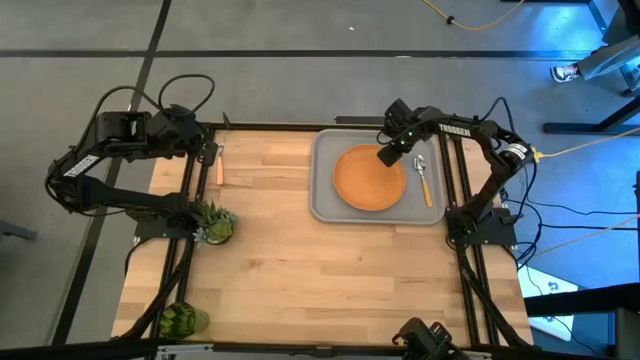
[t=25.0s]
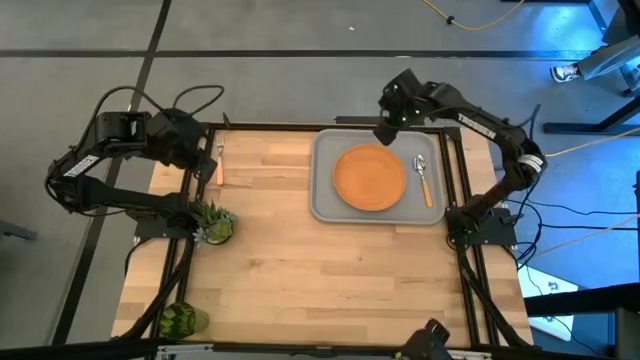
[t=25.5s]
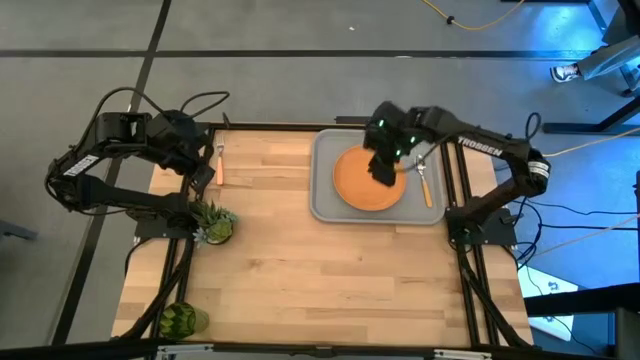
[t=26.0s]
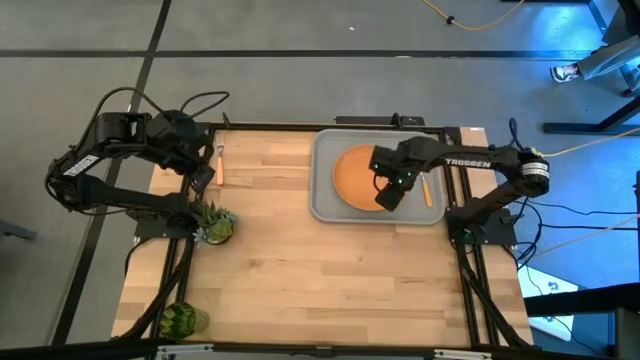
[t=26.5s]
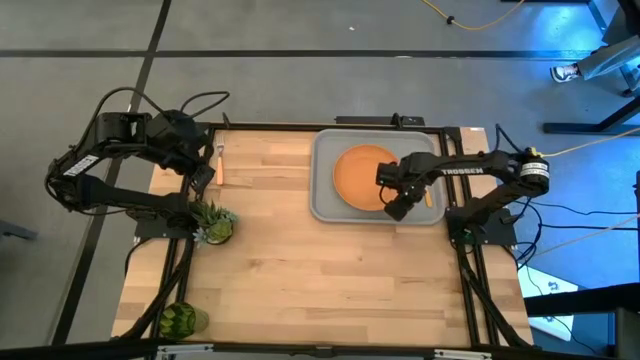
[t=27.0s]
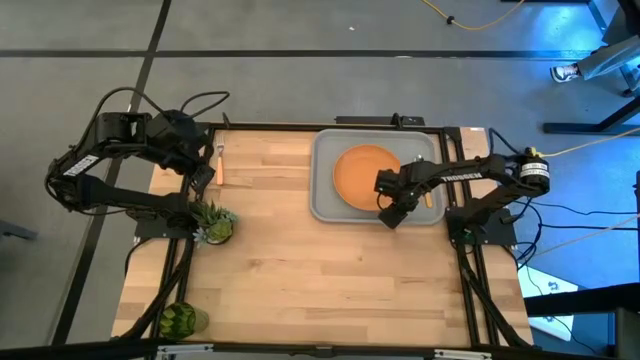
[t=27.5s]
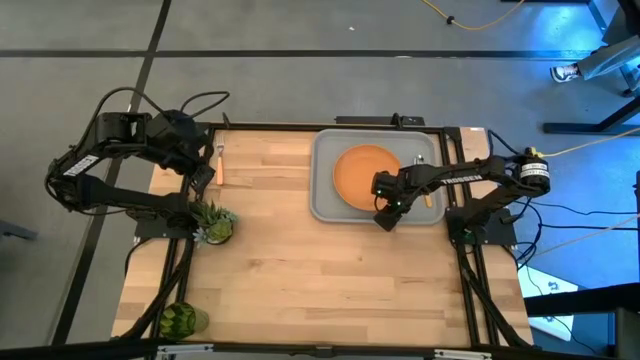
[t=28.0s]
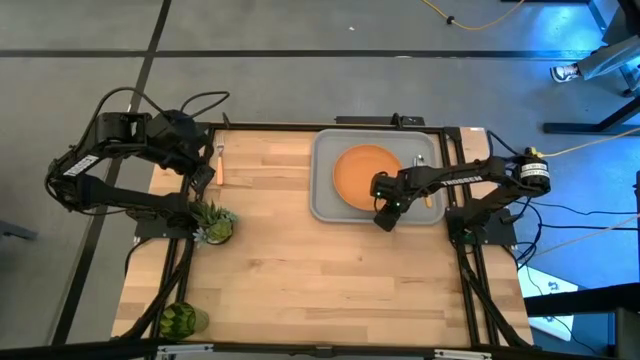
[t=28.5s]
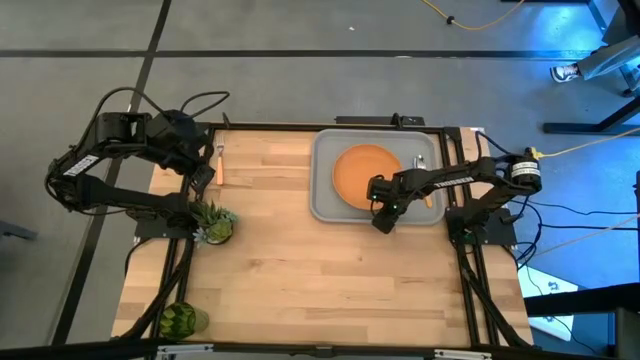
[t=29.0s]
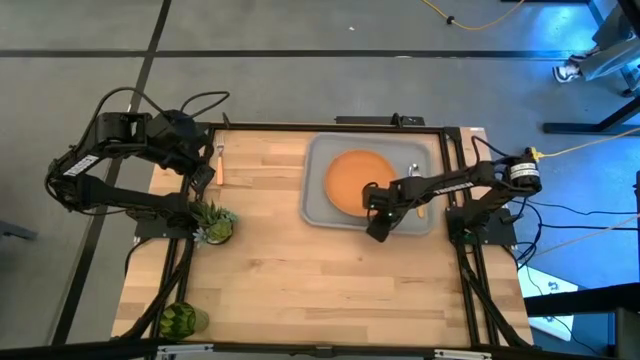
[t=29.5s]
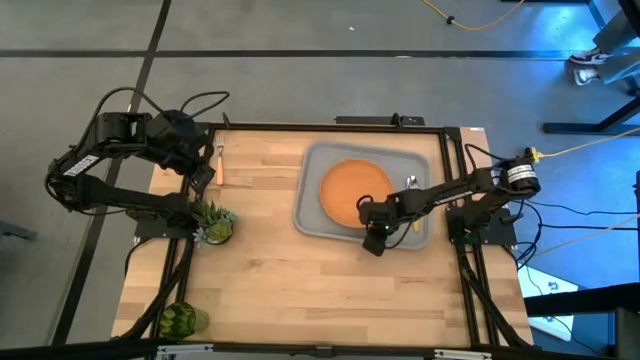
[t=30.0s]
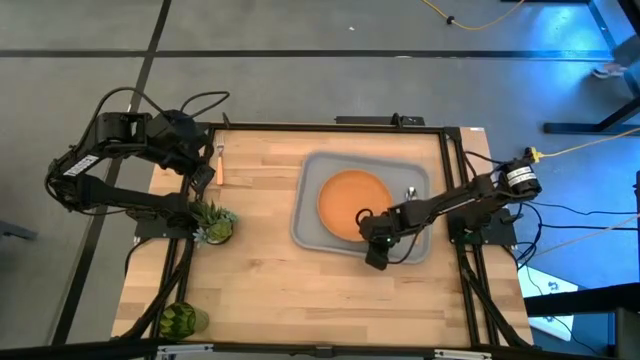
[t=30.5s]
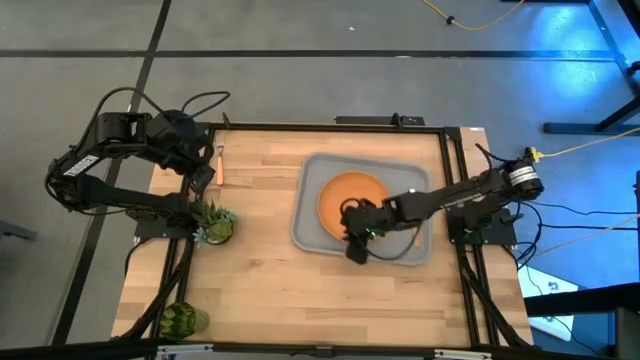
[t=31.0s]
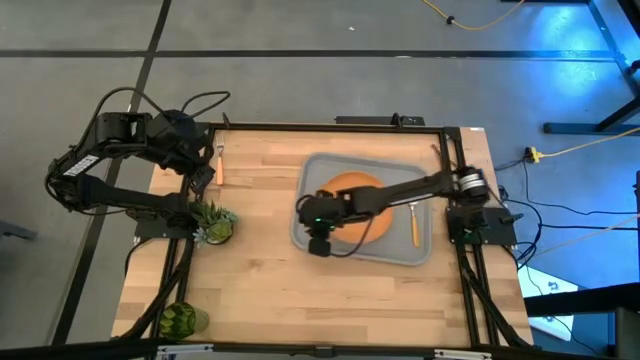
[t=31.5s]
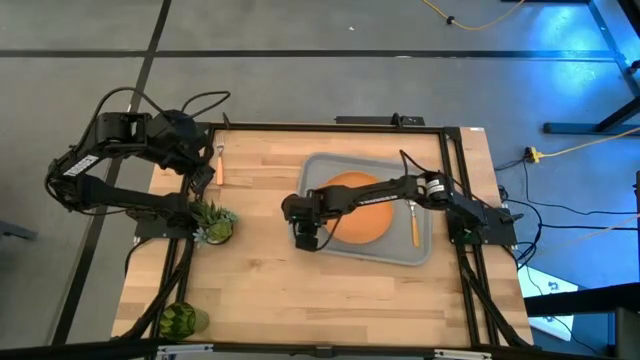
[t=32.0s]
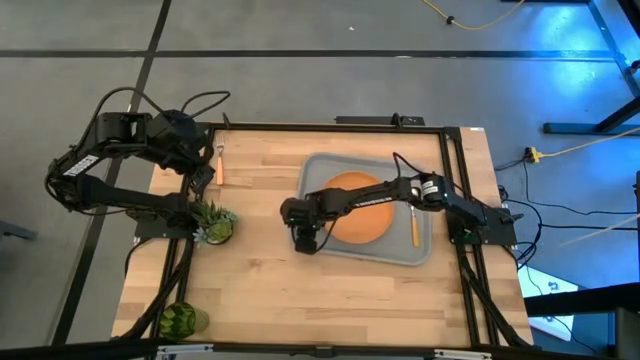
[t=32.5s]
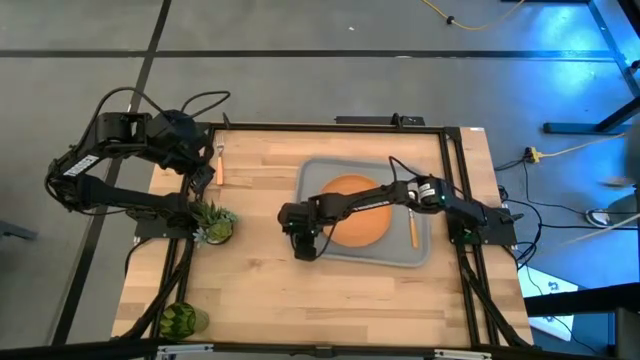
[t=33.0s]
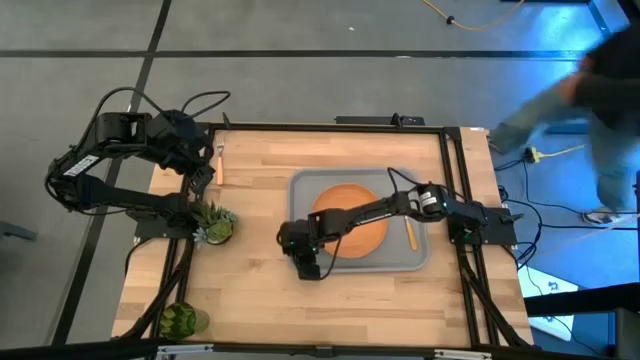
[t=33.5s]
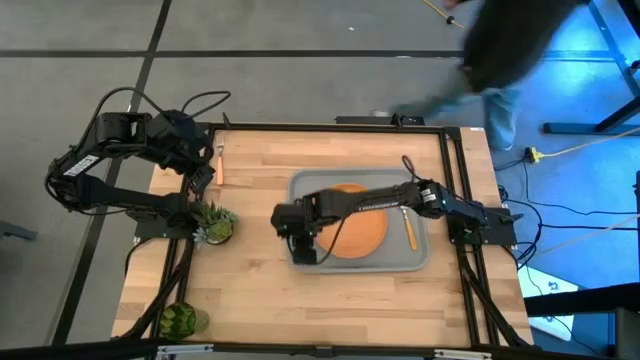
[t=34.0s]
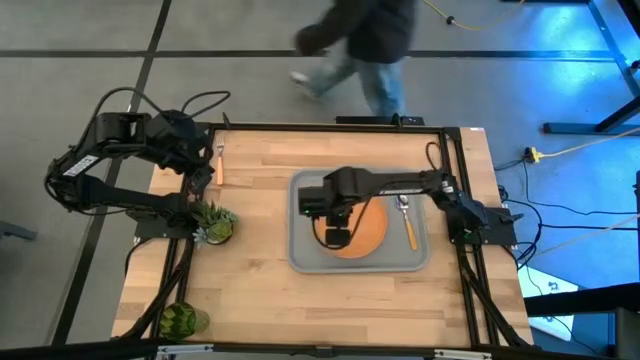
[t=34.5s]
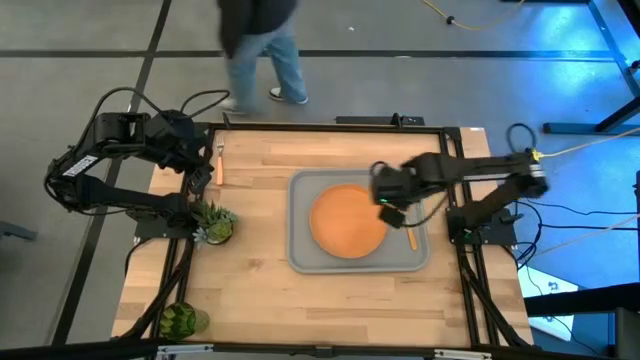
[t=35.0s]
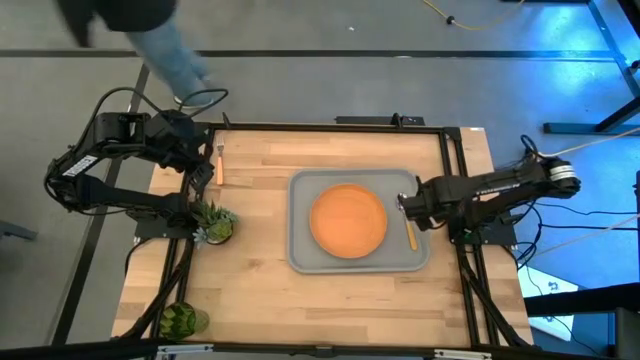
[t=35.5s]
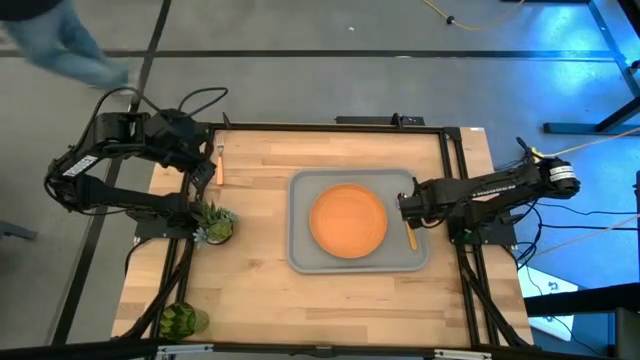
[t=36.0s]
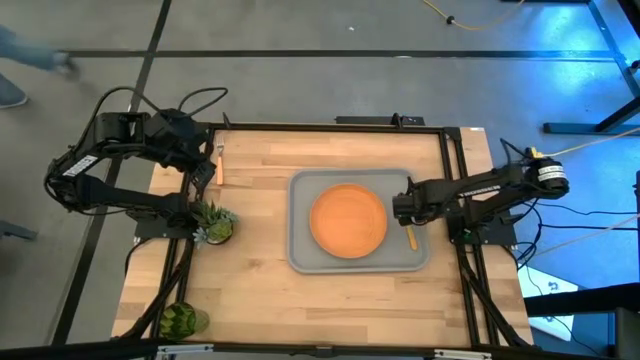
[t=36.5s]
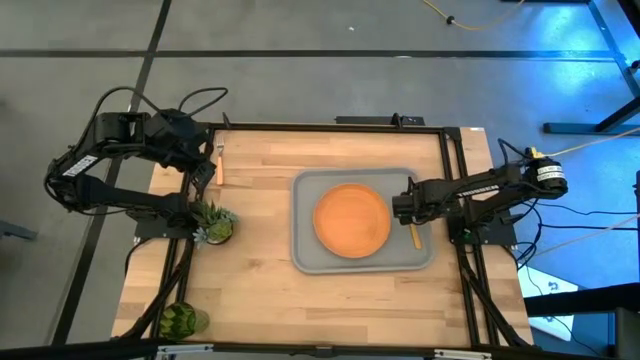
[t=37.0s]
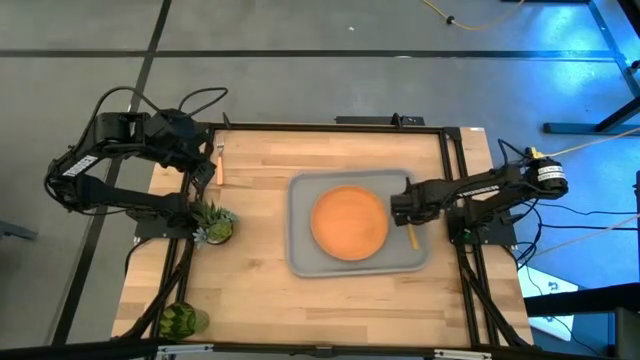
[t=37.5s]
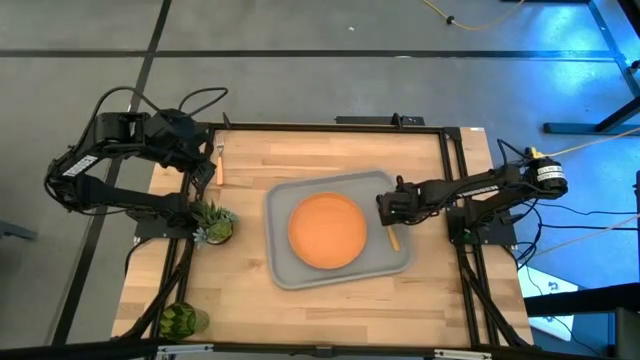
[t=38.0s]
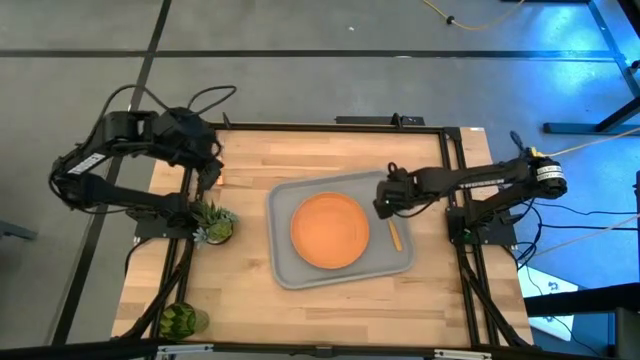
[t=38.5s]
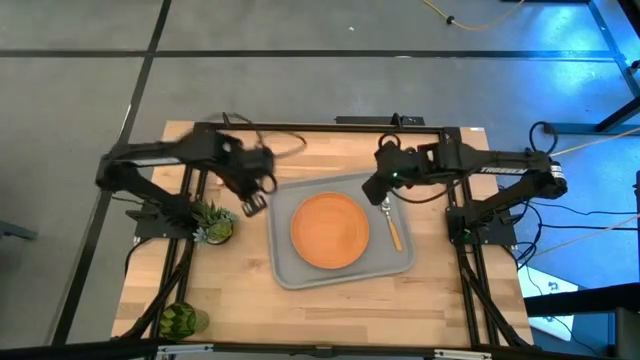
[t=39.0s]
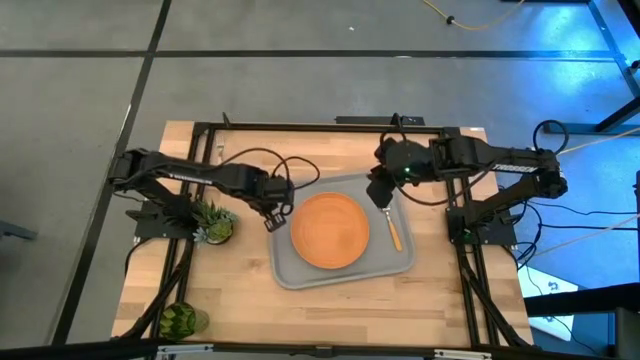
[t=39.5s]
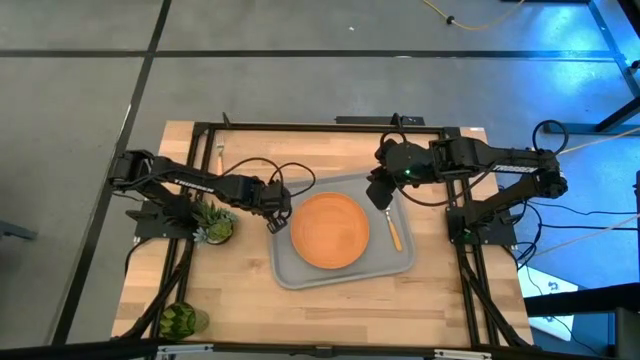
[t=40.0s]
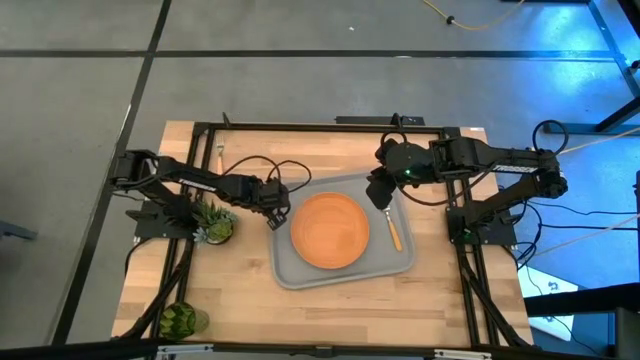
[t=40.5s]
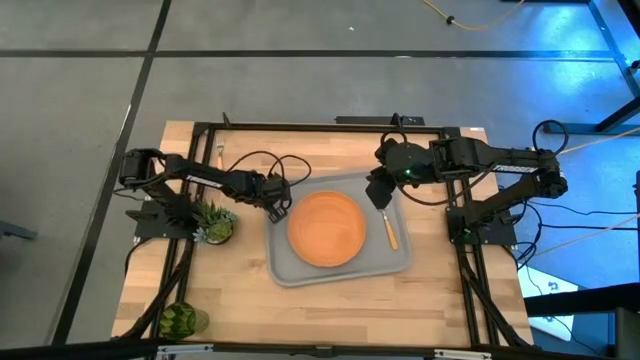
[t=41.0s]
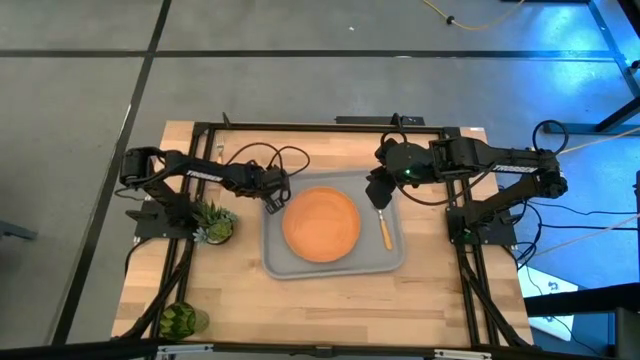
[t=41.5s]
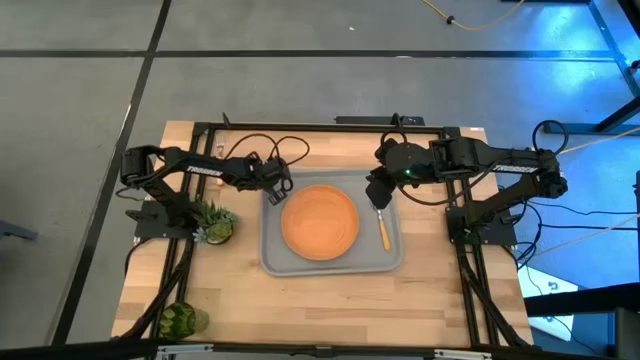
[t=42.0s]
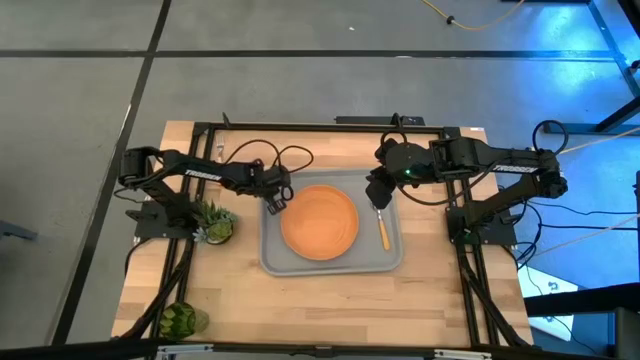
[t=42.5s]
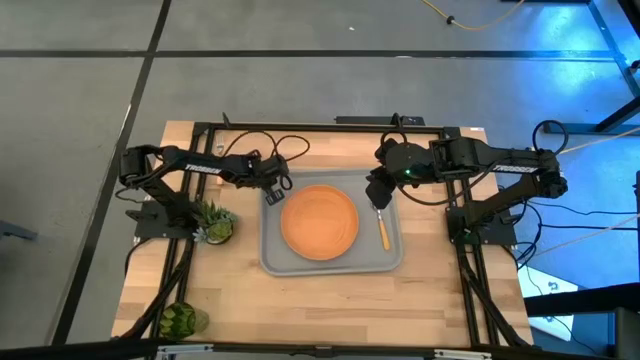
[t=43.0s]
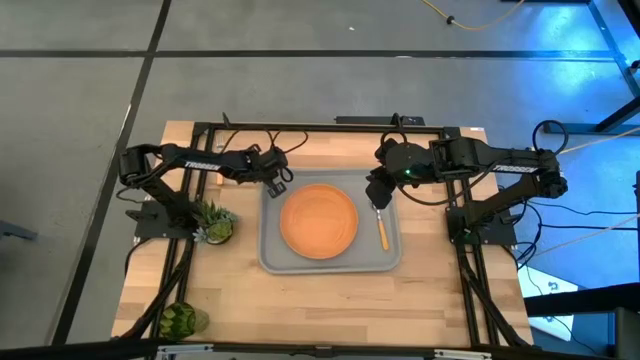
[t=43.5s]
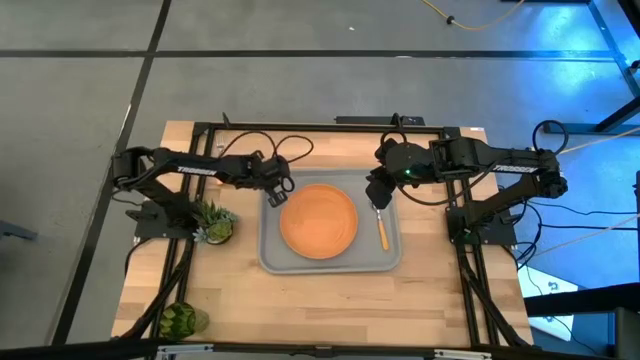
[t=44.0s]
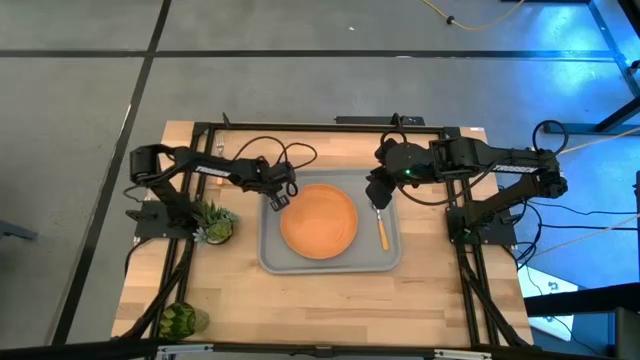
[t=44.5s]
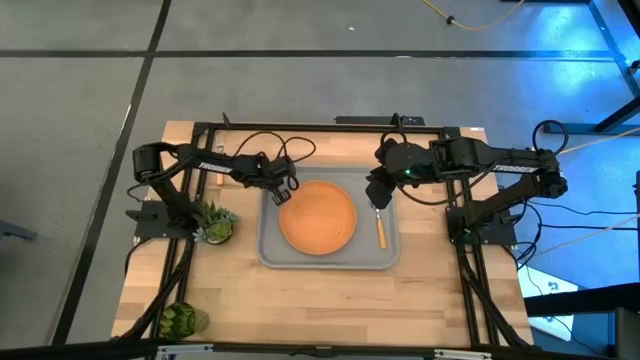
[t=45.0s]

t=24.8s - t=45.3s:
Task: Pick and place plate/cup/fork/spoon on tray
Move the gray food tray to the center of the table
